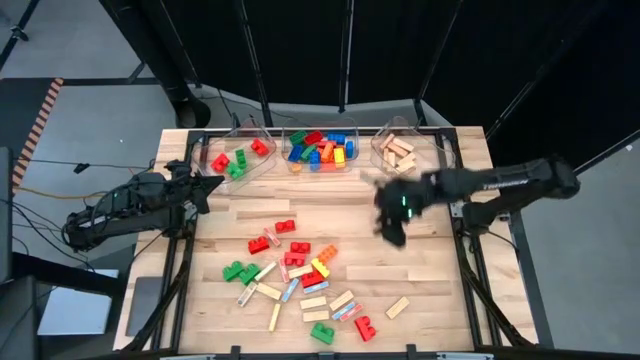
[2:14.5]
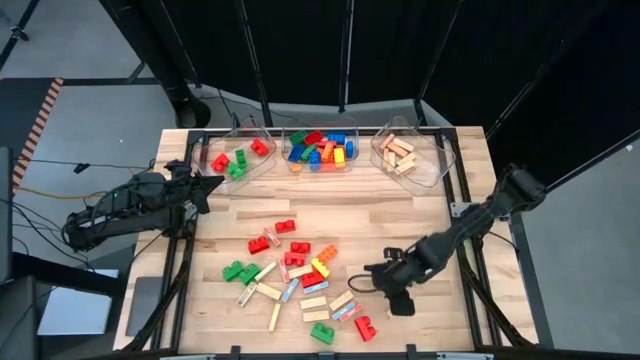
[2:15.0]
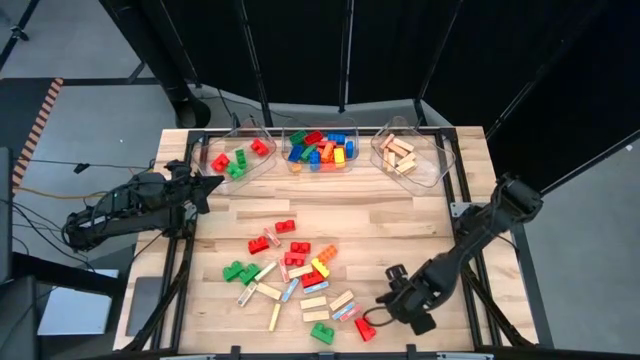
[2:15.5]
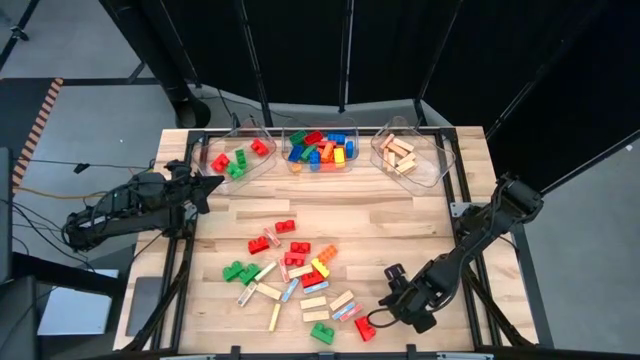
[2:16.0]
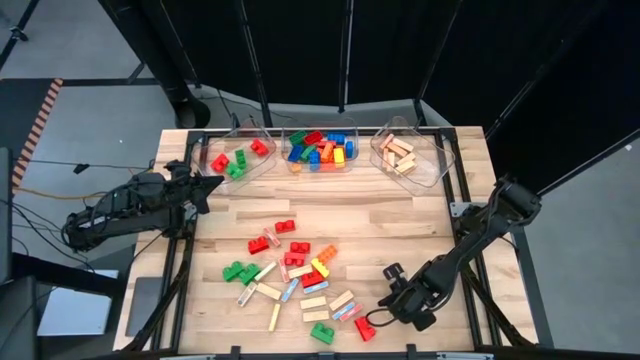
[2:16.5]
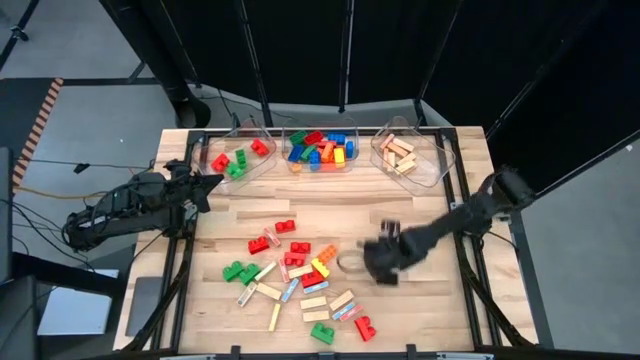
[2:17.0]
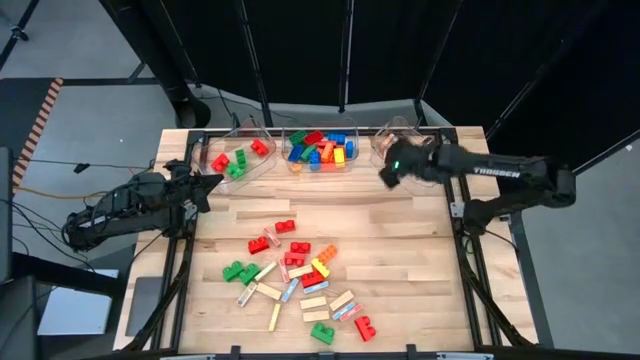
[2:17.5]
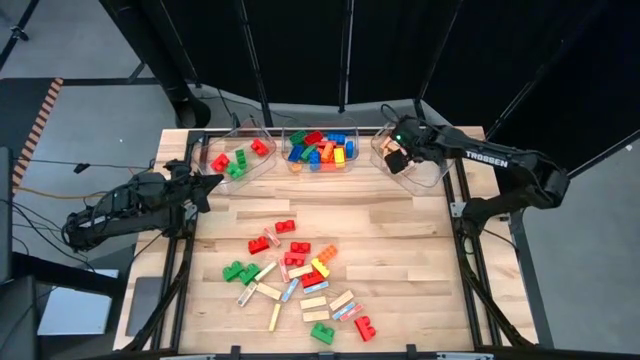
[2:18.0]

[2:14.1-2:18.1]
Task: Sort blocks by size
Put the brown wooden block into the right transparent bin

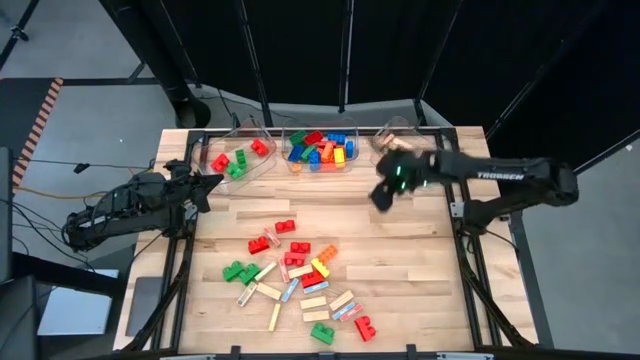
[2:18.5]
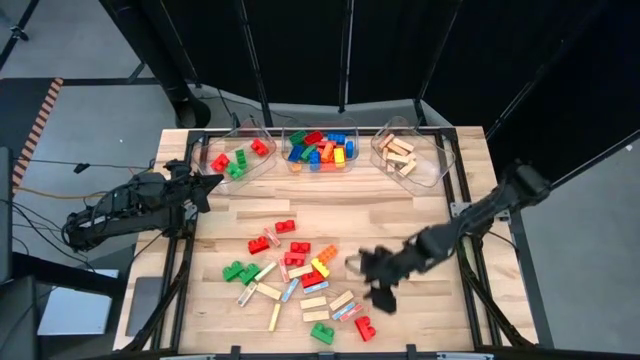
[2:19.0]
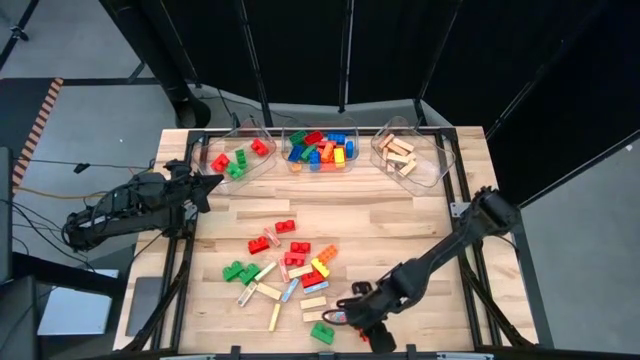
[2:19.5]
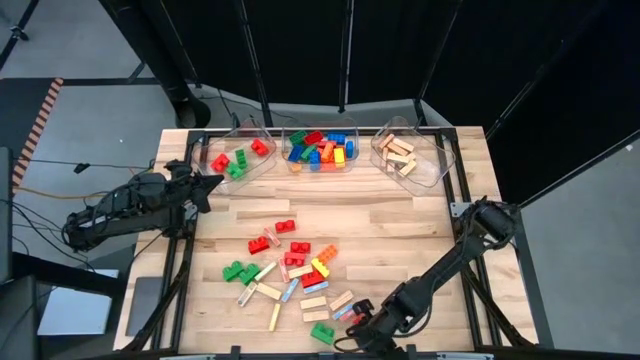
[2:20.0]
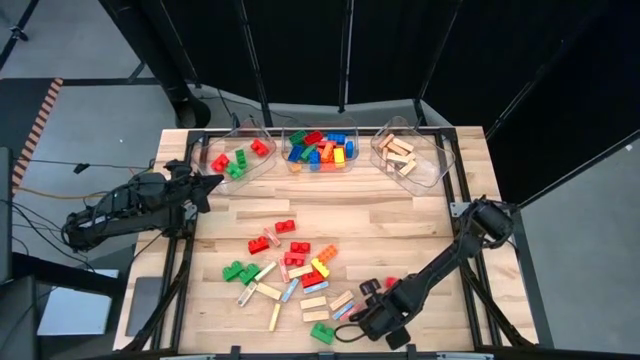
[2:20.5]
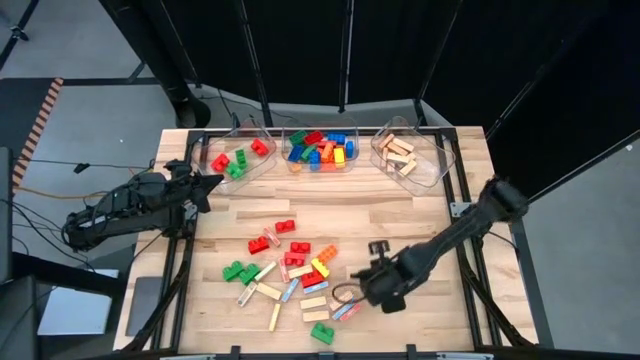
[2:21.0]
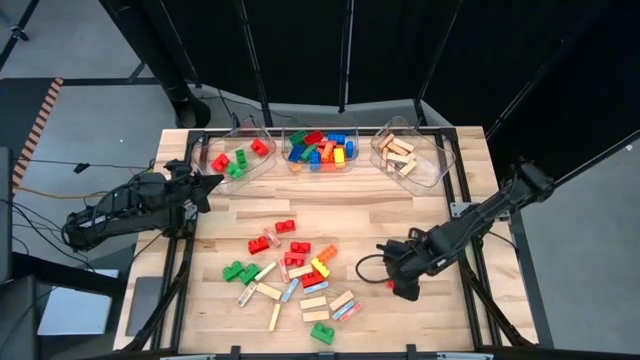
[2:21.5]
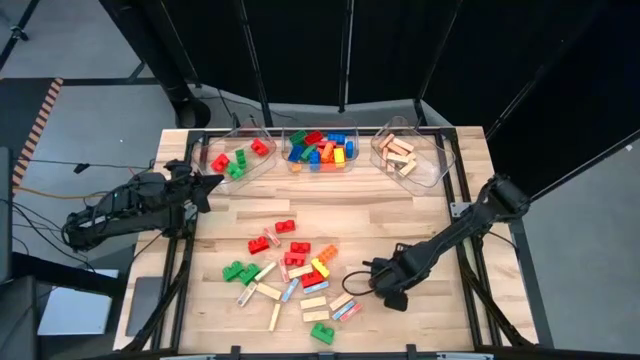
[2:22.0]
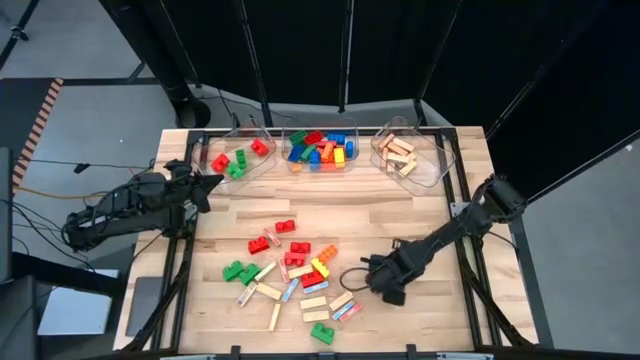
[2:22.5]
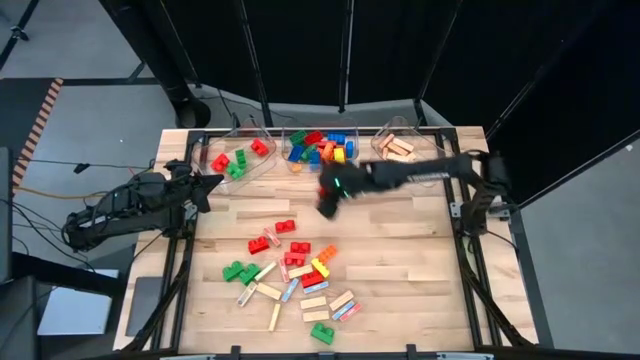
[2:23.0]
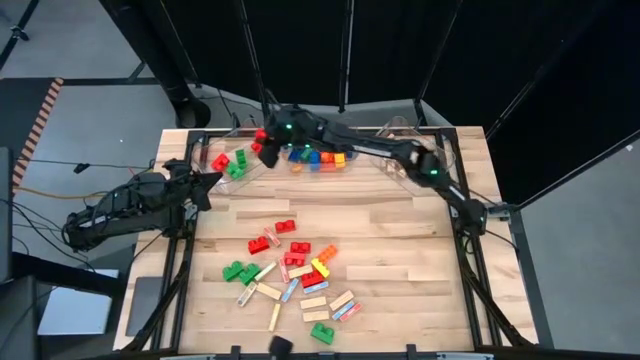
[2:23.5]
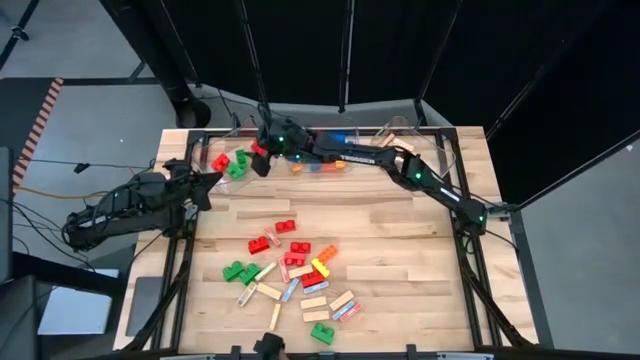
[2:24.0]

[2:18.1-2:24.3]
Put the small red game piece into the left transparent bin

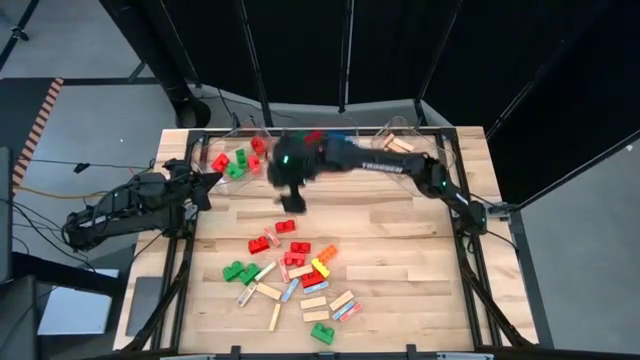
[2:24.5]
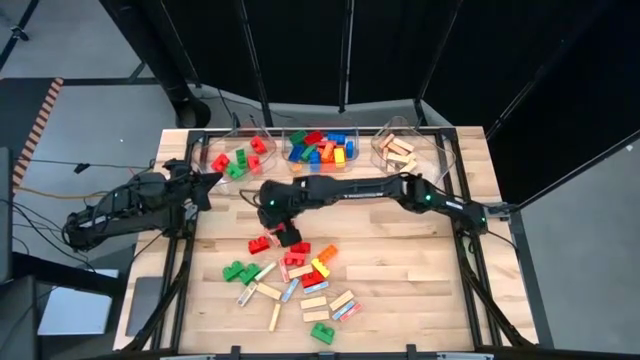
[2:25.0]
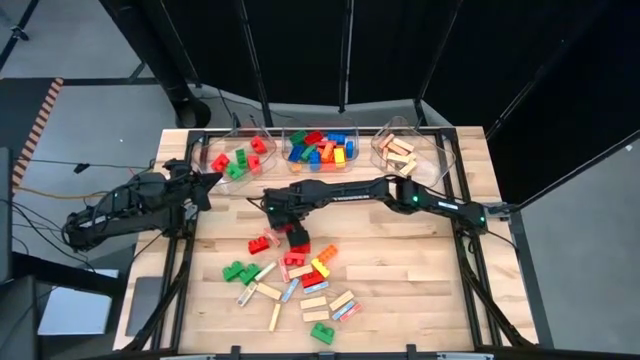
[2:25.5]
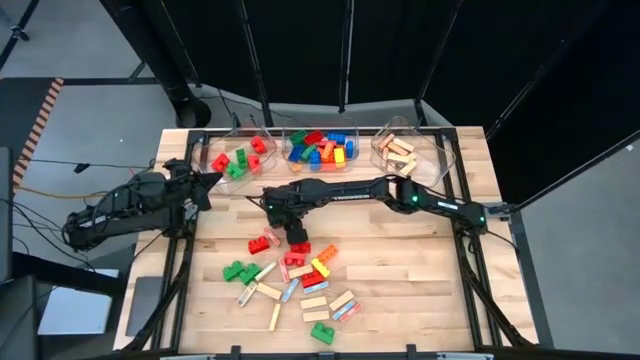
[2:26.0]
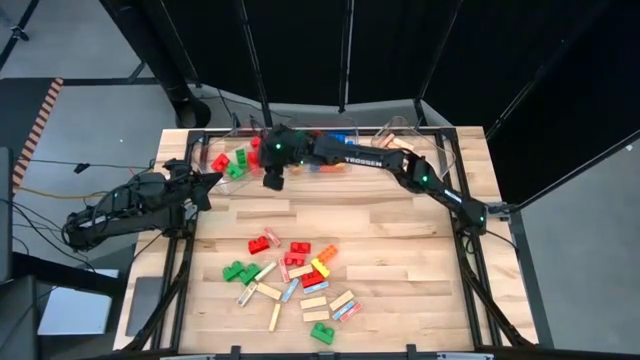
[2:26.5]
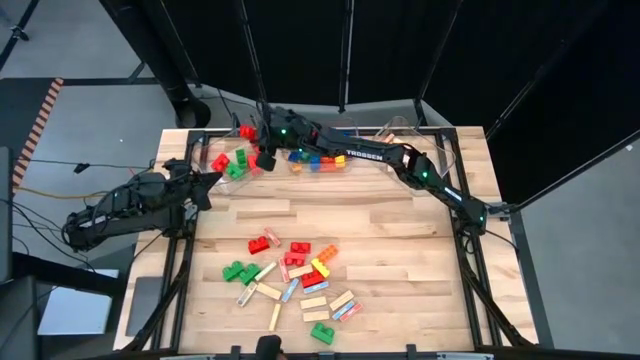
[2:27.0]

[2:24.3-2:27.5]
Put the small red game piece into the left transparent bin

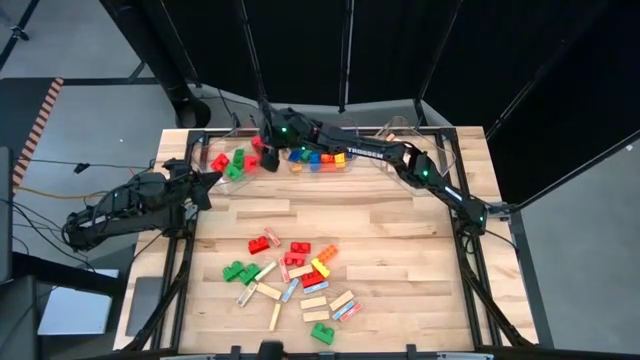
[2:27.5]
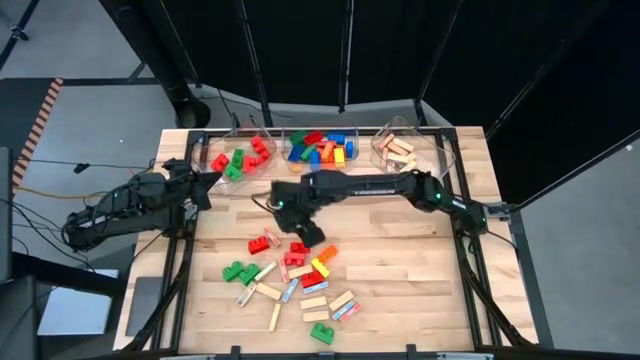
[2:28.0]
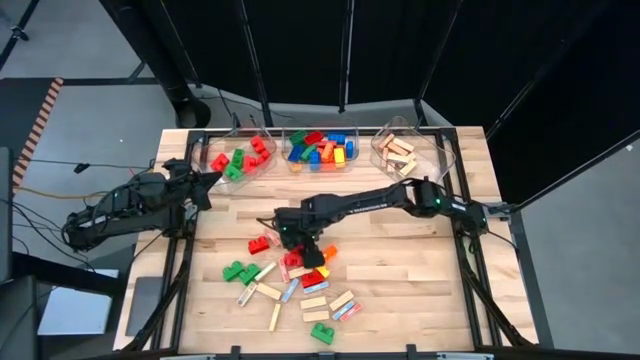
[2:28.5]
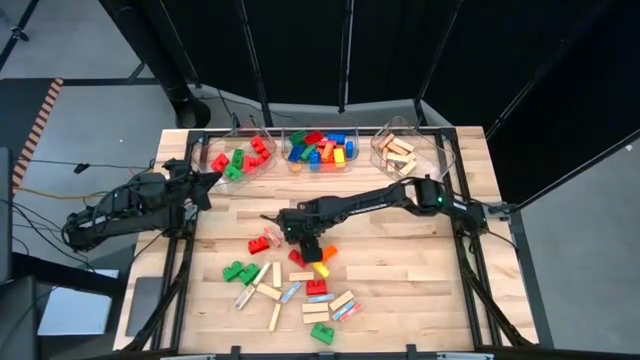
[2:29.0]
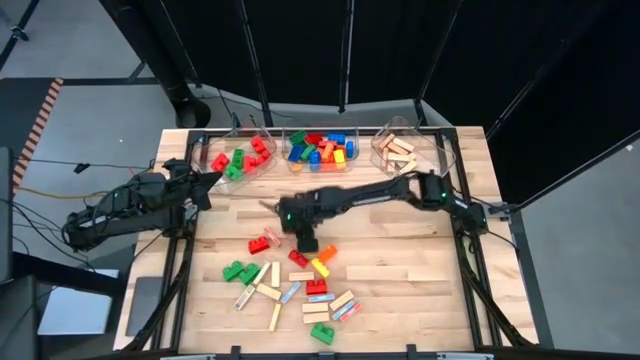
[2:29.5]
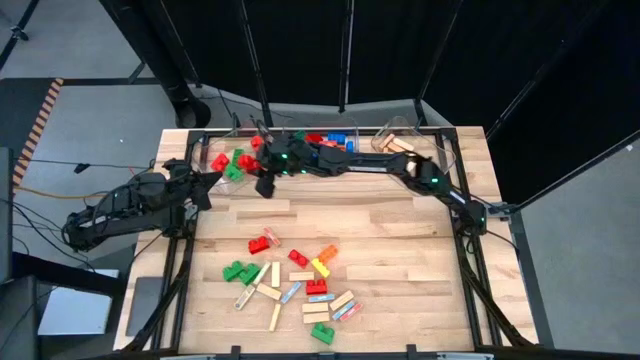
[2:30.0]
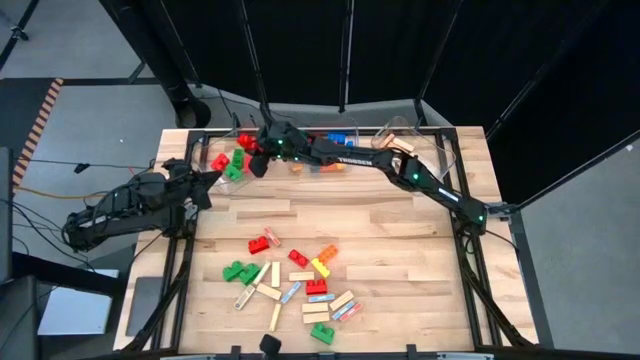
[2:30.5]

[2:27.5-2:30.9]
Put the small red game piece into the left transparent bin

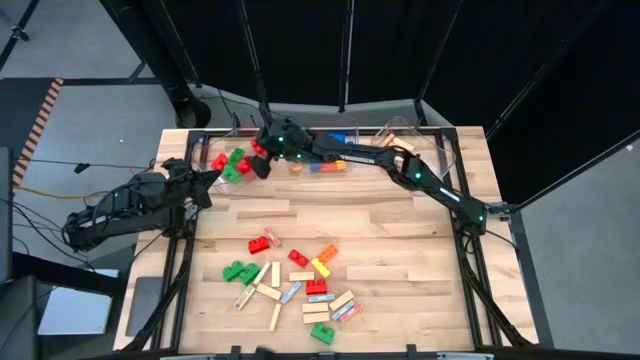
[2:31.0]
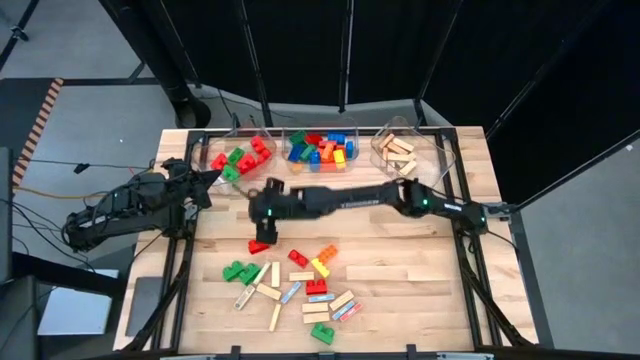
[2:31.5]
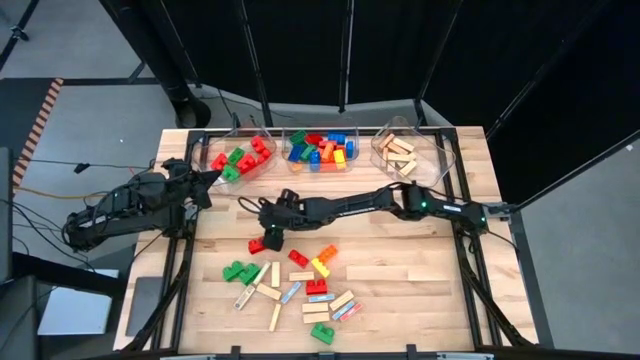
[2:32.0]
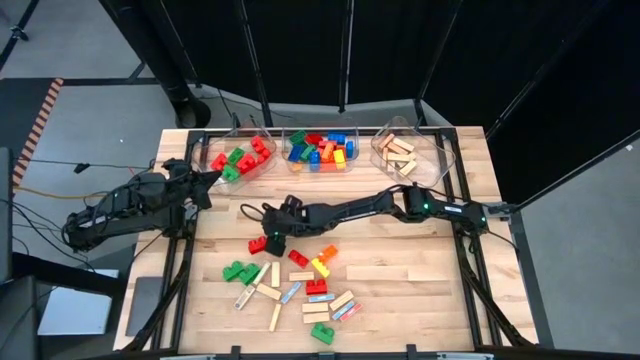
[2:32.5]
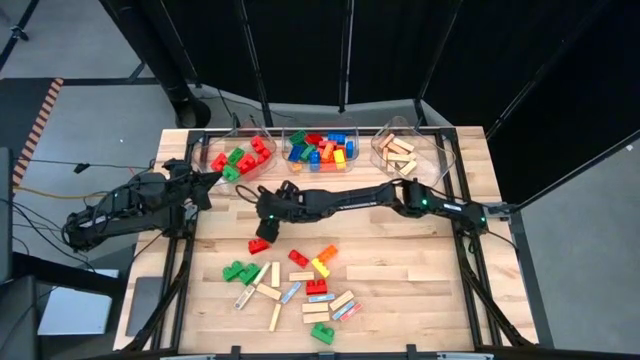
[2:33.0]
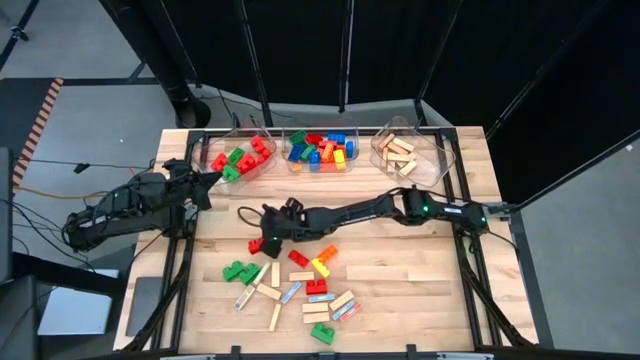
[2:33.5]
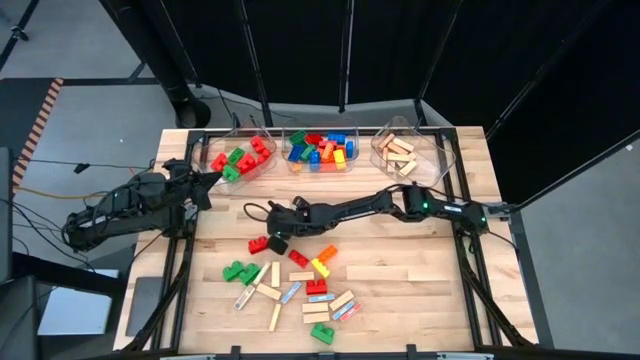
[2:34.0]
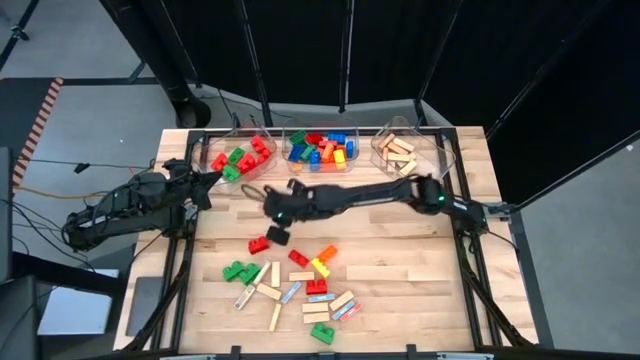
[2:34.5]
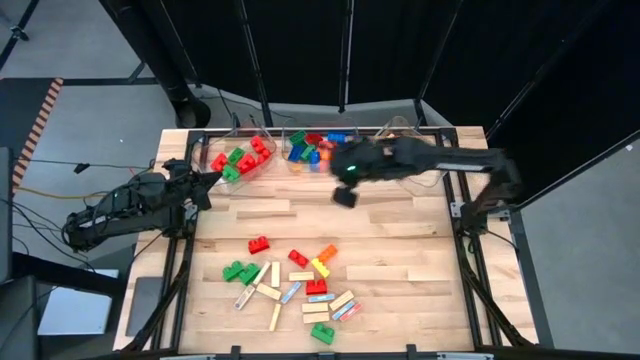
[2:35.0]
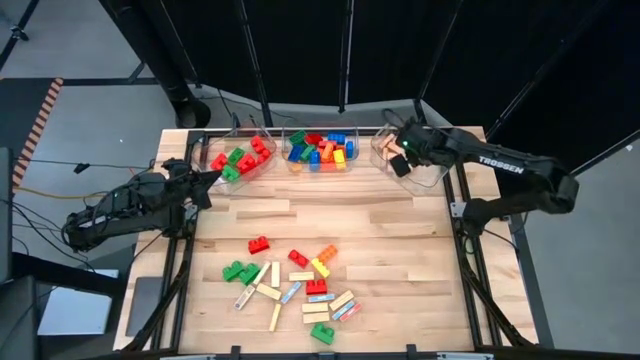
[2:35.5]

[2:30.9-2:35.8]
Put the brown wooden block into the right transparent bin
